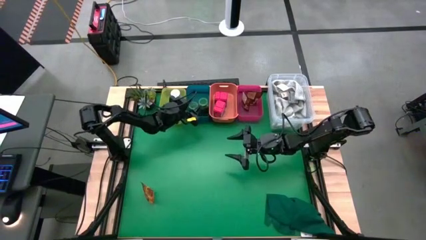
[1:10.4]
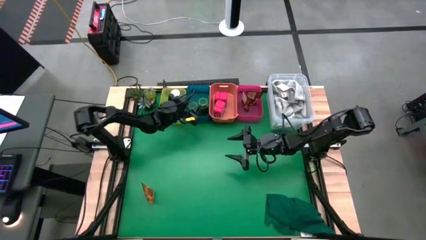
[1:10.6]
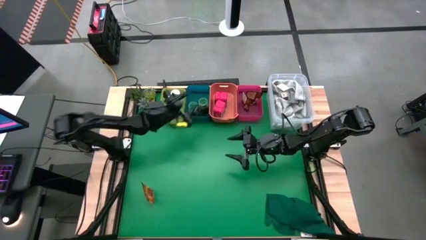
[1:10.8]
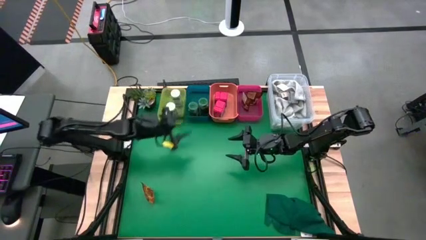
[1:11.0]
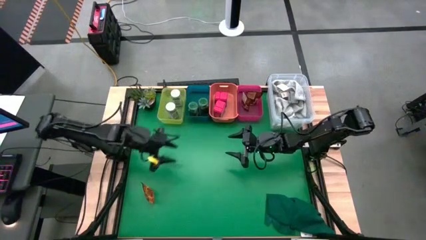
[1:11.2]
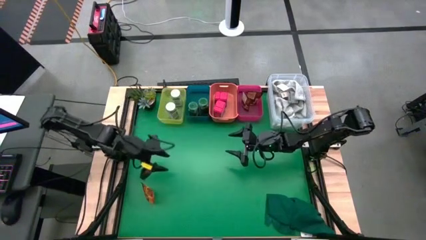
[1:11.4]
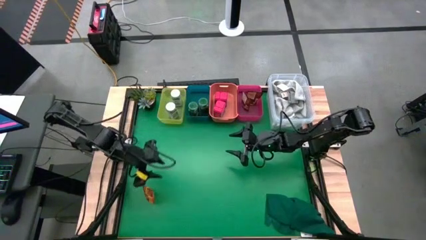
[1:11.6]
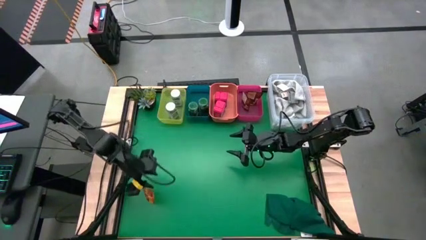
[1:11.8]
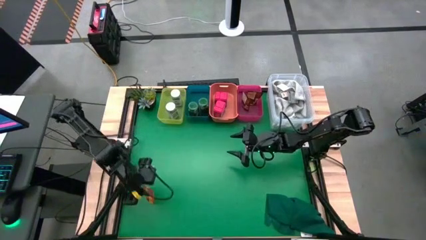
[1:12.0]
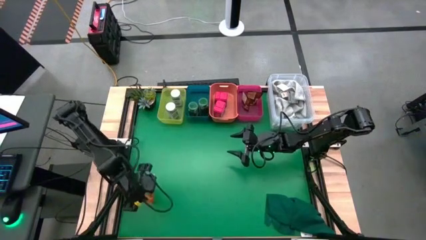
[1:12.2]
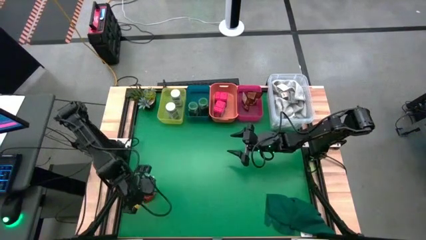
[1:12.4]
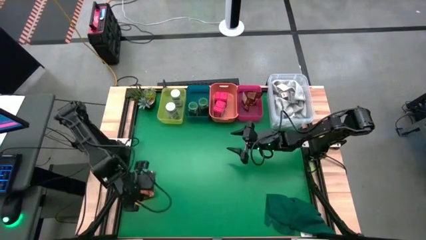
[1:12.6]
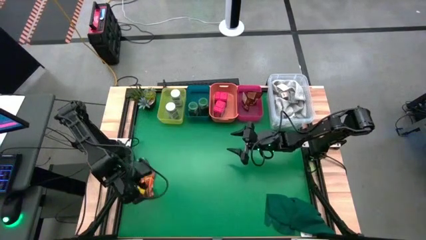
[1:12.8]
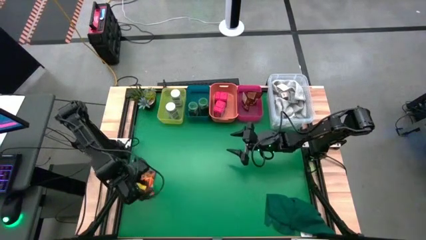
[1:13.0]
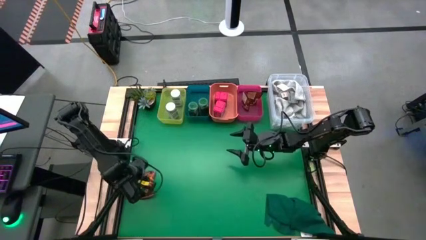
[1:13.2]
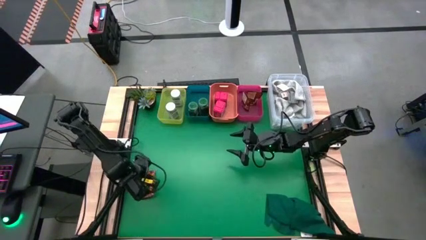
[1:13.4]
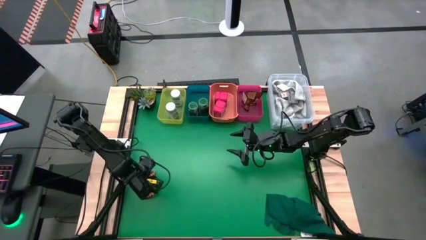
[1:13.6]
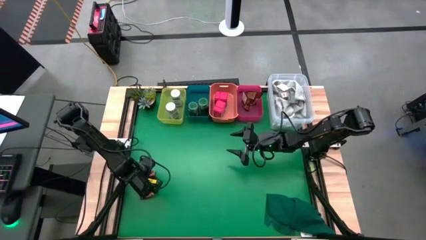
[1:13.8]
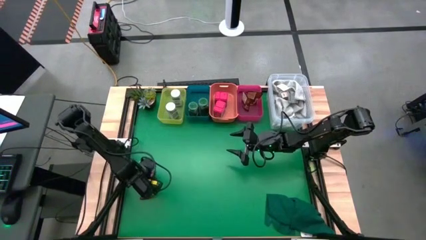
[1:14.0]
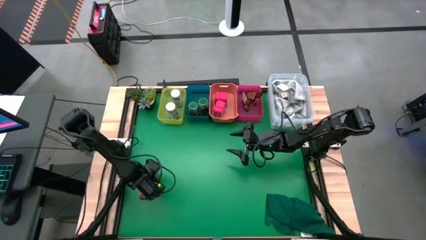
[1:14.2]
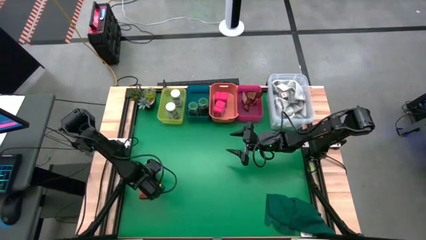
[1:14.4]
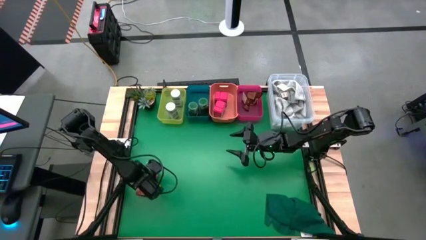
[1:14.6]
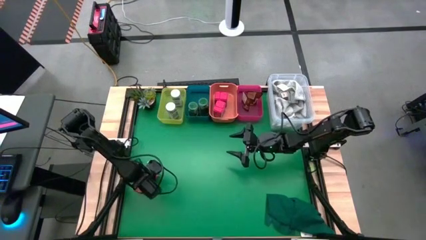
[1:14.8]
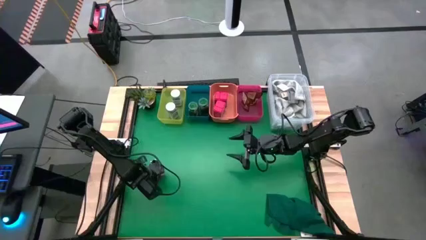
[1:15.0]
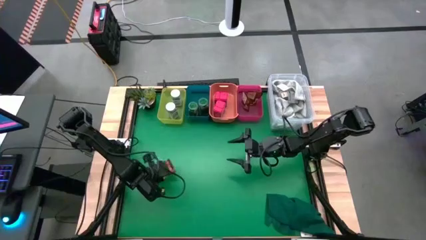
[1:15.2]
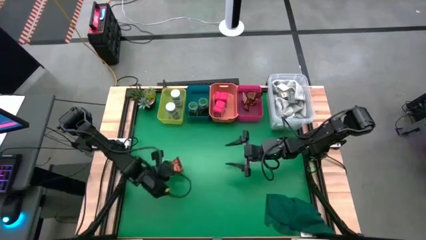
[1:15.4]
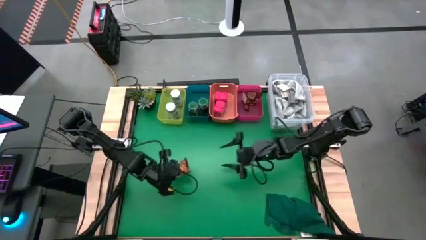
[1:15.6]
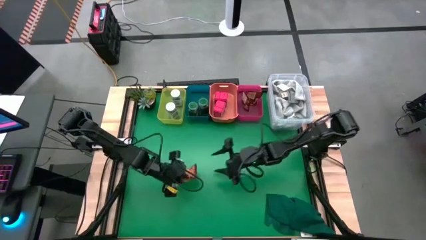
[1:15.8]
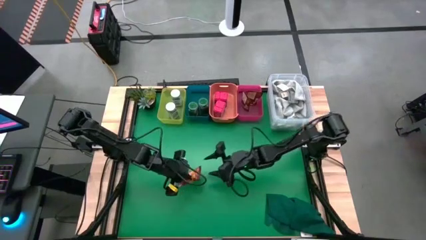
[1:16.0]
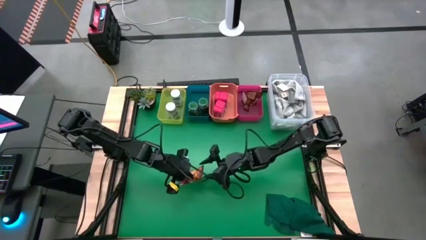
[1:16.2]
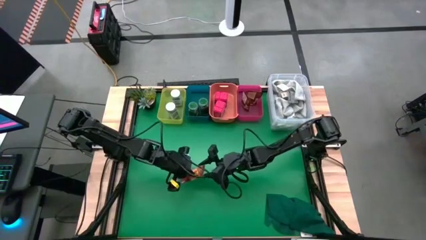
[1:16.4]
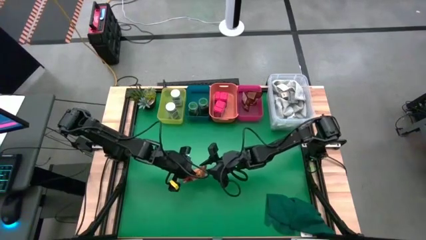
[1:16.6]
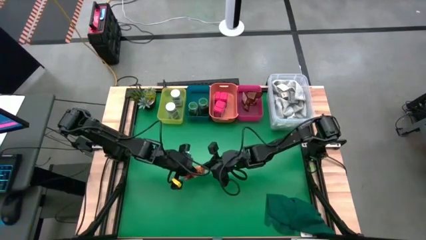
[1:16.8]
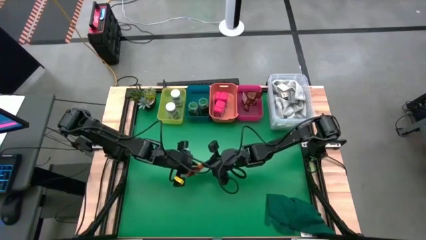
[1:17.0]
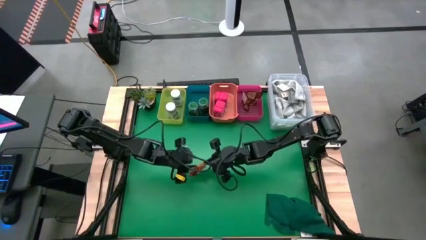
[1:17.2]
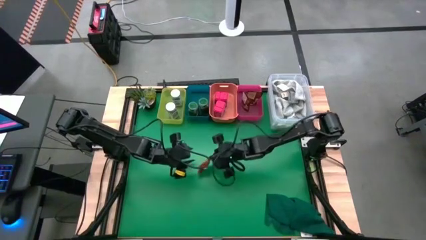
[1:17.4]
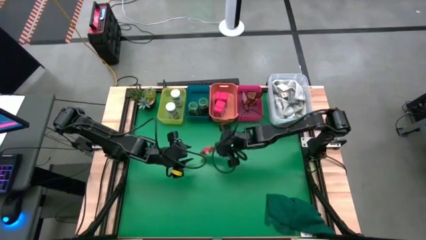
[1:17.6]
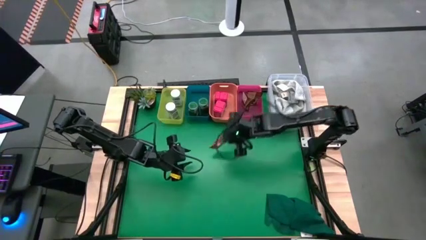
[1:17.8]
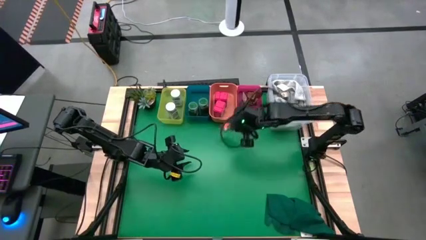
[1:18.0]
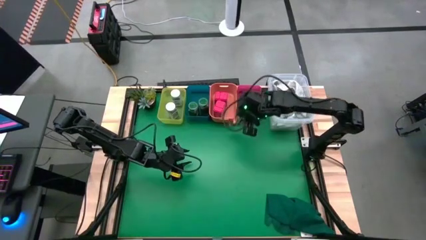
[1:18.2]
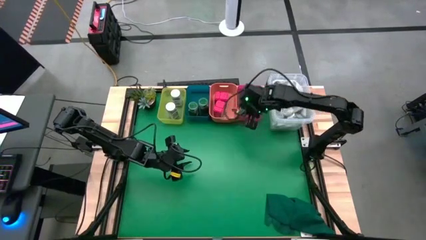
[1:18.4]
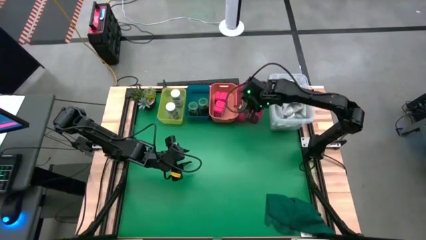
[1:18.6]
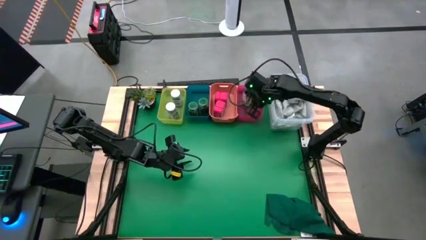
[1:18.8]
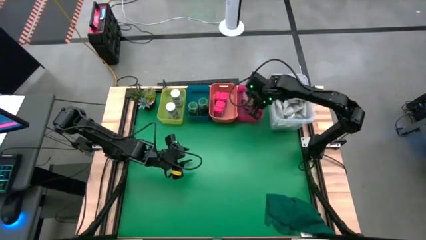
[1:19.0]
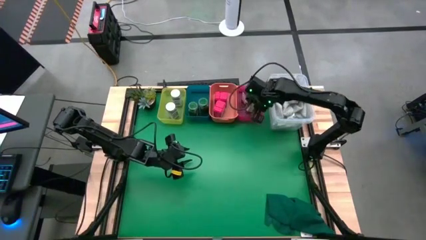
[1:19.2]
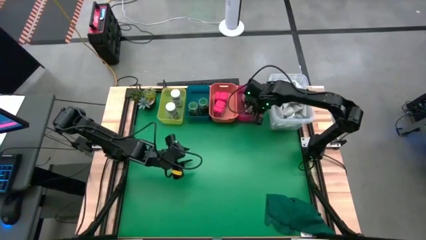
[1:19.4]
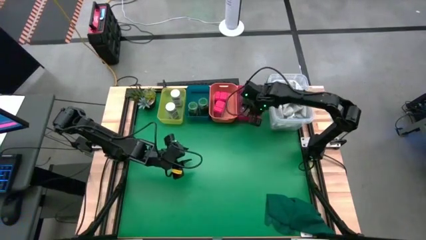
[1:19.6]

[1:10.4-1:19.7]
Task: Sort spices by type
Put the orange seasoning pack into the pink bin

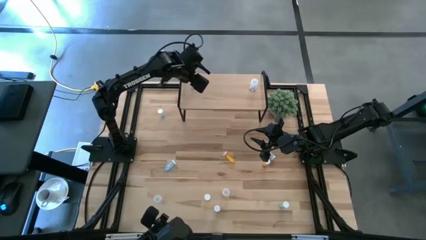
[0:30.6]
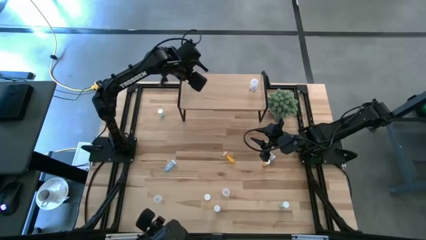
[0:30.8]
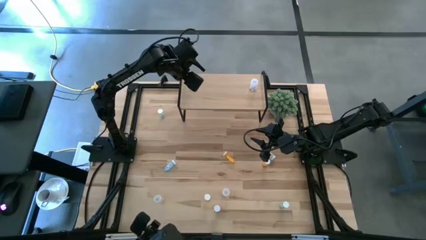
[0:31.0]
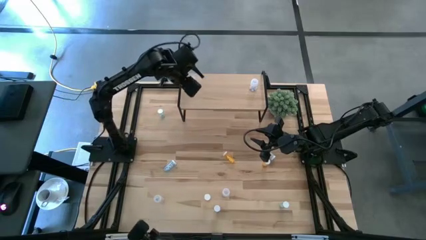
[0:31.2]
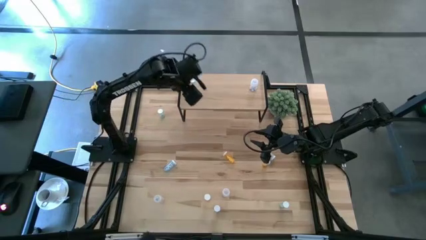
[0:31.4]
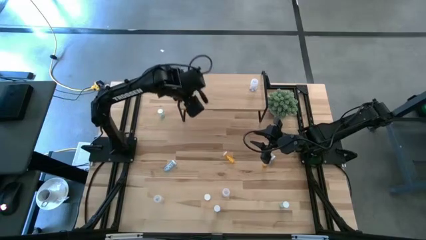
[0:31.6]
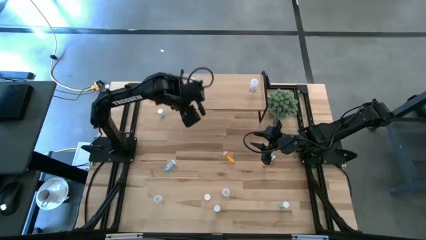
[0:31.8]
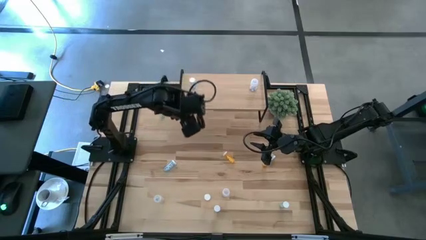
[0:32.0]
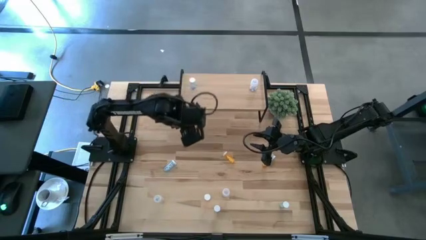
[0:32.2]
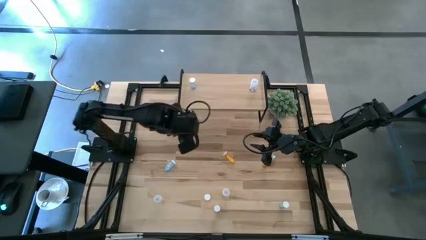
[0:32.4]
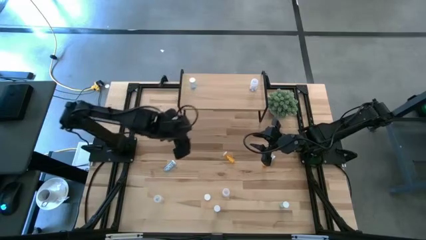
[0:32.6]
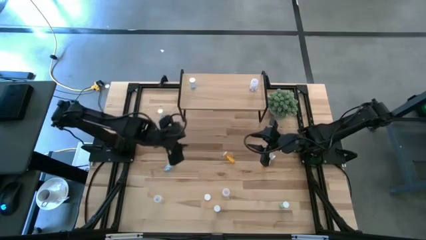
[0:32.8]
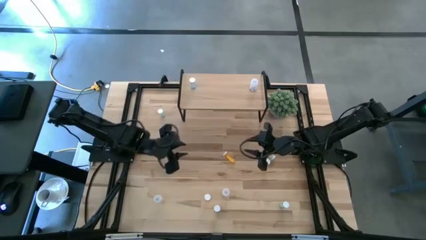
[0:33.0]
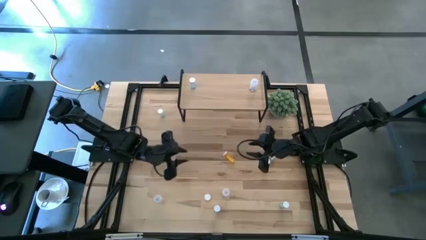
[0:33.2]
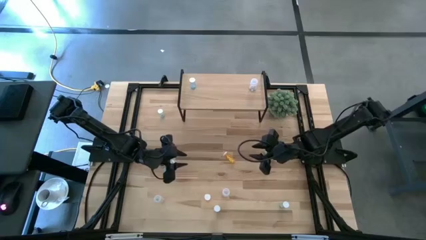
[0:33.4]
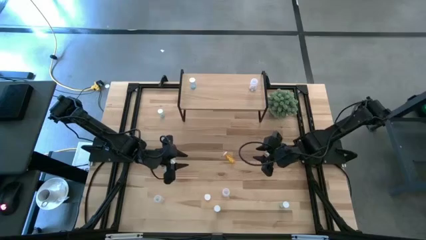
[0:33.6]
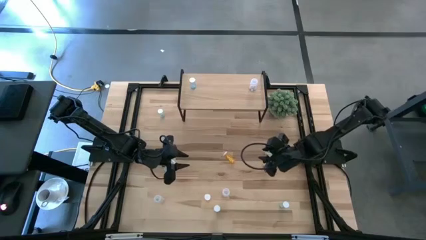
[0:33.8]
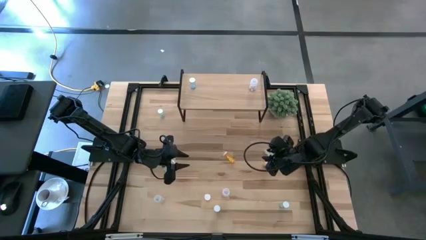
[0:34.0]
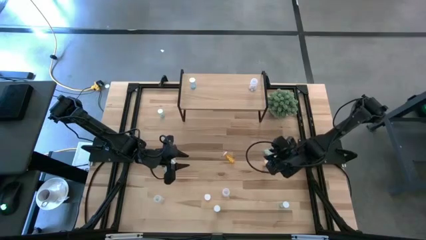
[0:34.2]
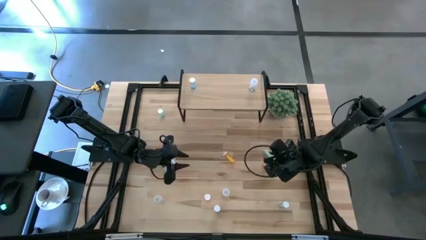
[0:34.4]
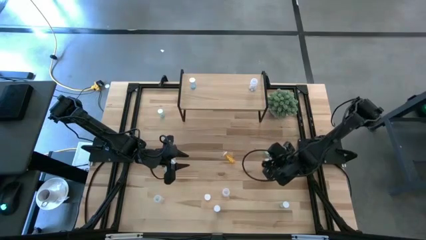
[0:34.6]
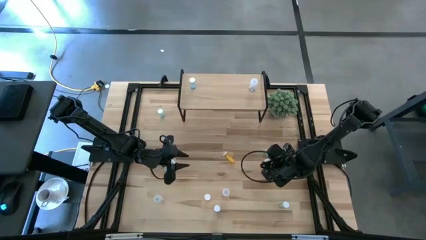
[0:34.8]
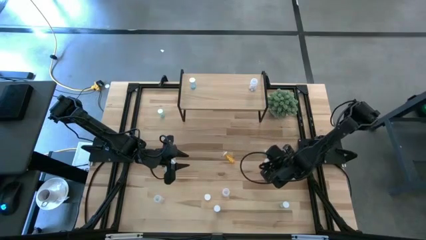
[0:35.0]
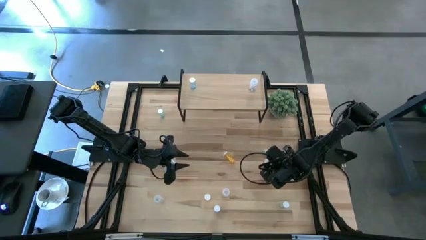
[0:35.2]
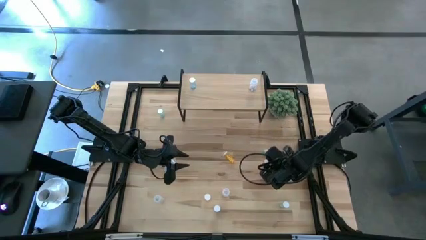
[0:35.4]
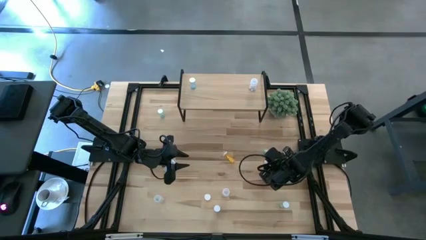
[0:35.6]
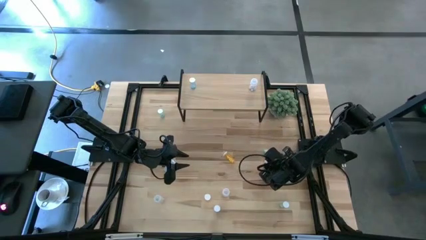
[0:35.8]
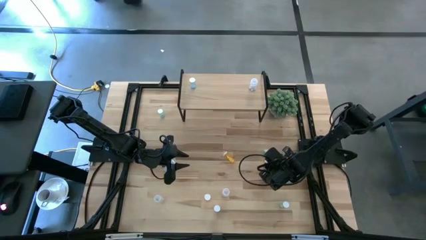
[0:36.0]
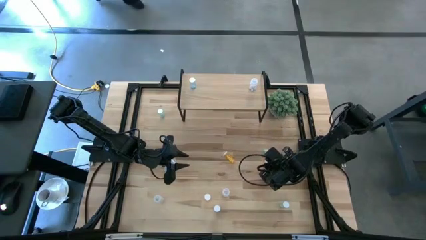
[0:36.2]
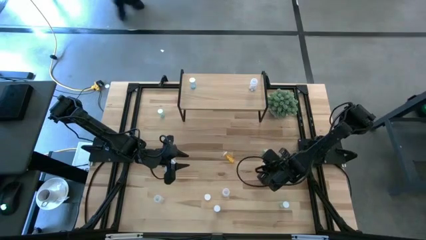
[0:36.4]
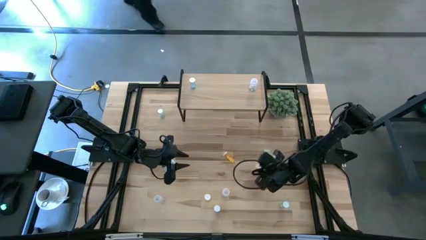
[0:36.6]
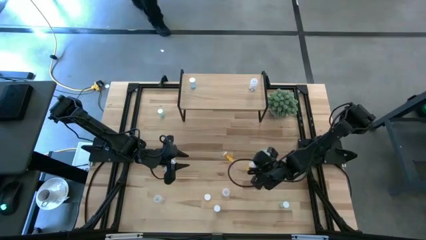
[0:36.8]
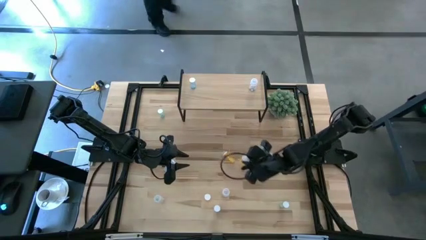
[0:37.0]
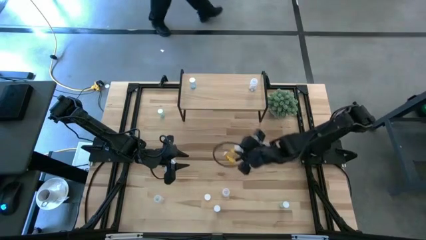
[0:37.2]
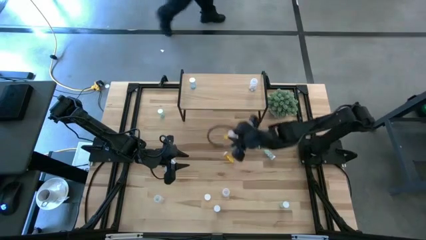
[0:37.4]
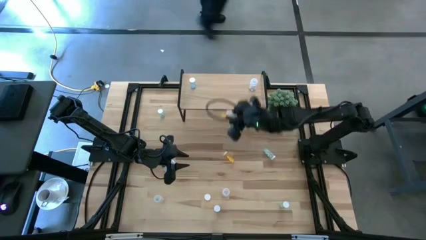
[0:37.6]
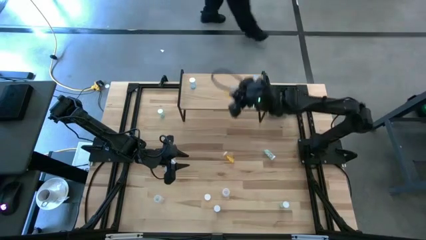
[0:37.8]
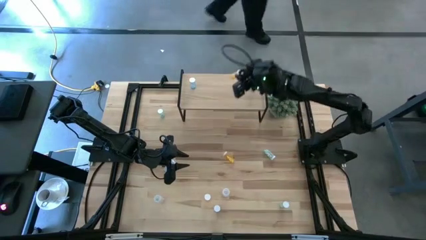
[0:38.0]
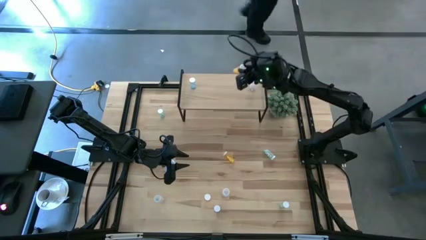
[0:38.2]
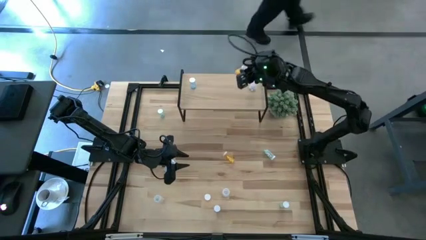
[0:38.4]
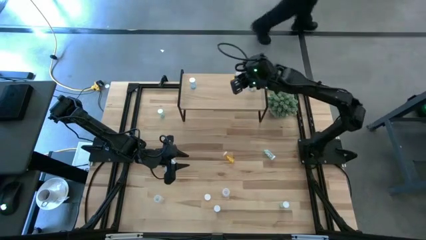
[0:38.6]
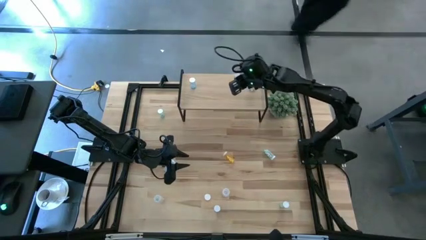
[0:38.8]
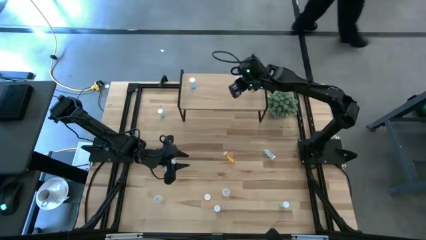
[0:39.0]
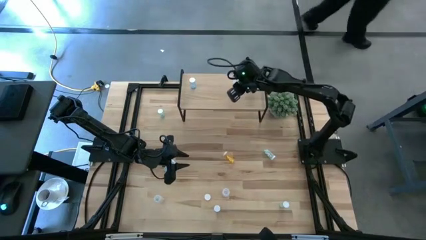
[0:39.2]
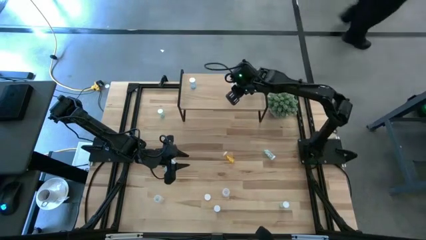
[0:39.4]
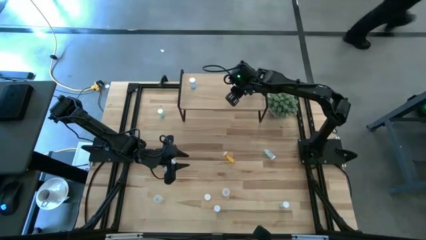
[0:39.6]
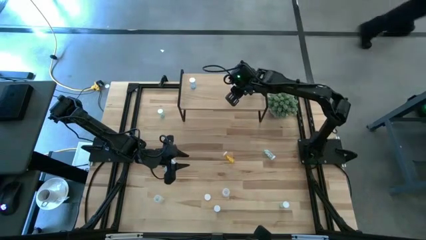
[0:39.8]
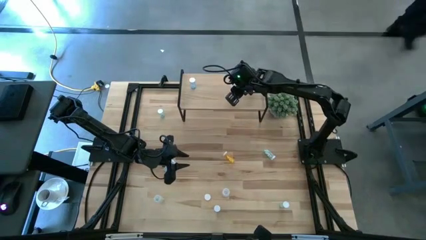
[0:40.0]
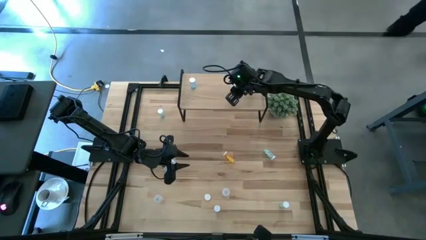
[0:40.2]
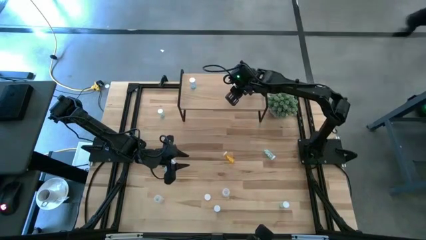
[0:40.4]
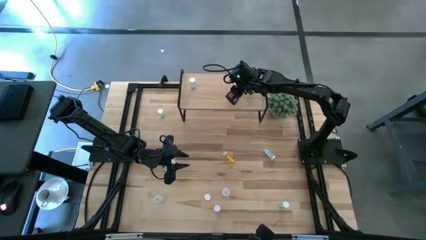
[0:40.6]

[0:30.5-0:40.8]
Task: Pick and place medicine bottles onto shelf by color
Put the top right orange pill bottle on the shelf
